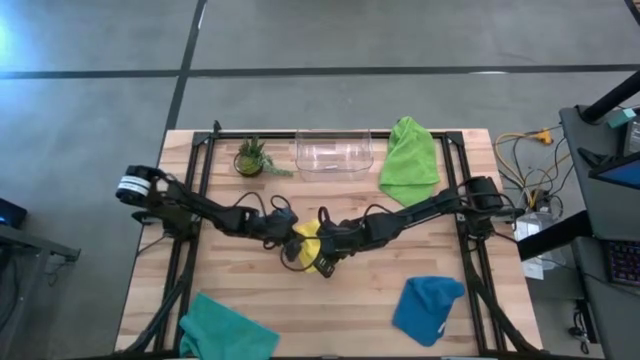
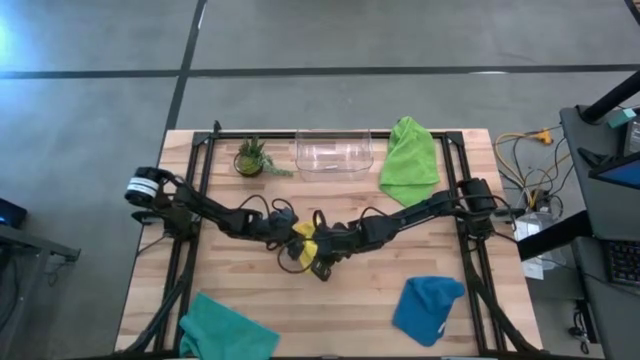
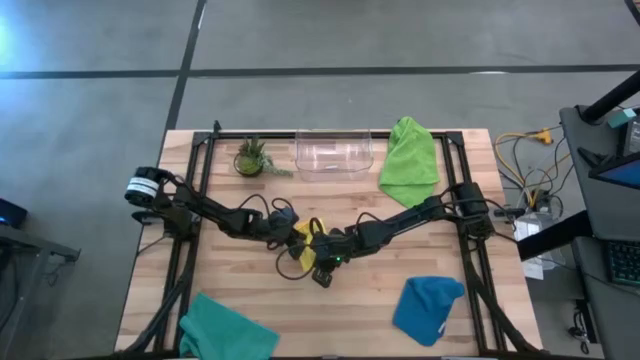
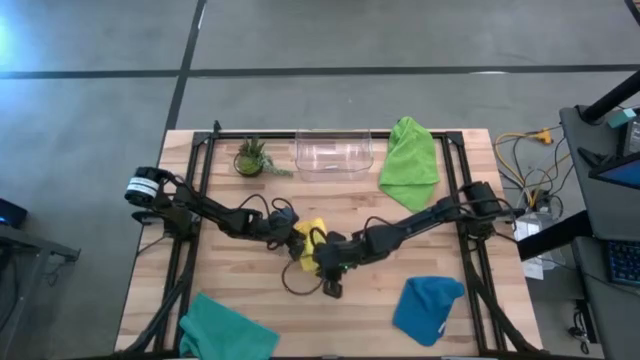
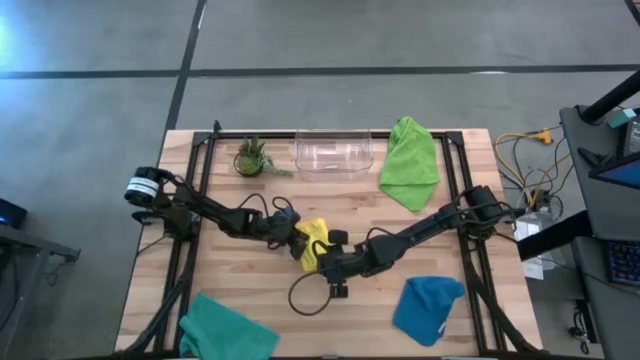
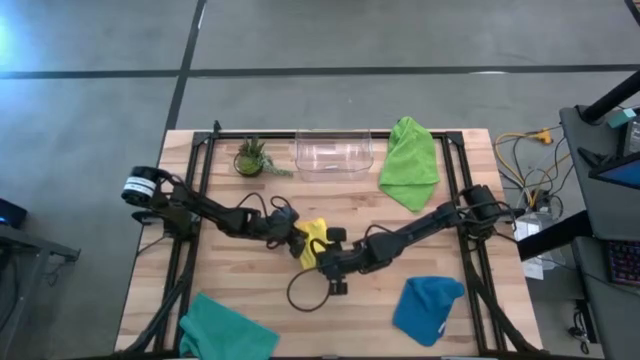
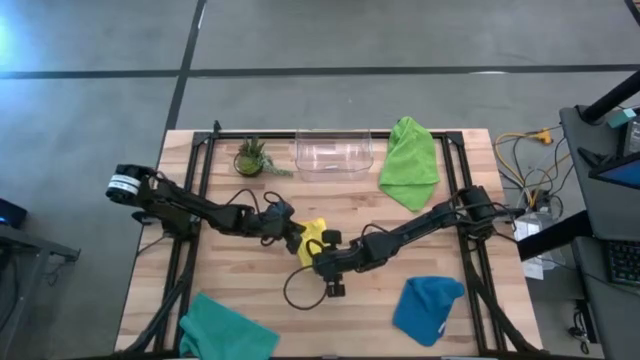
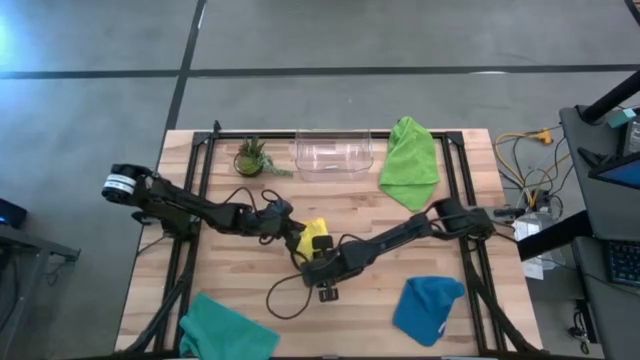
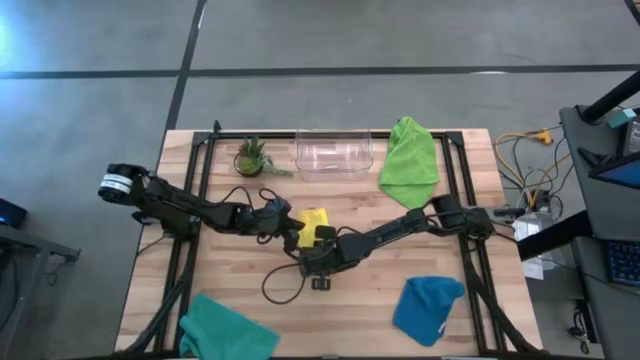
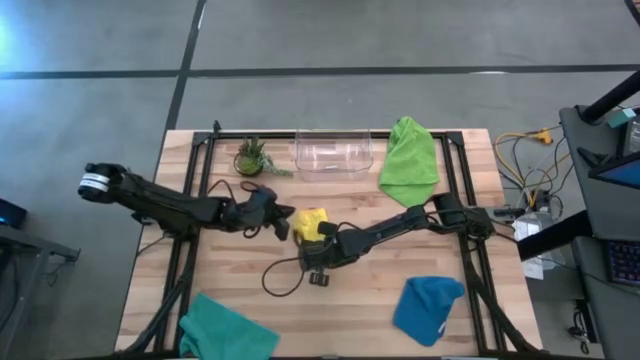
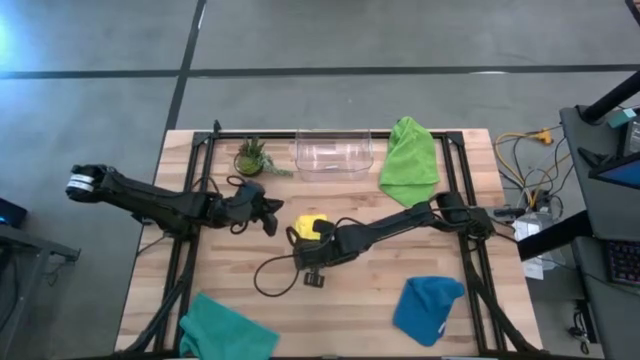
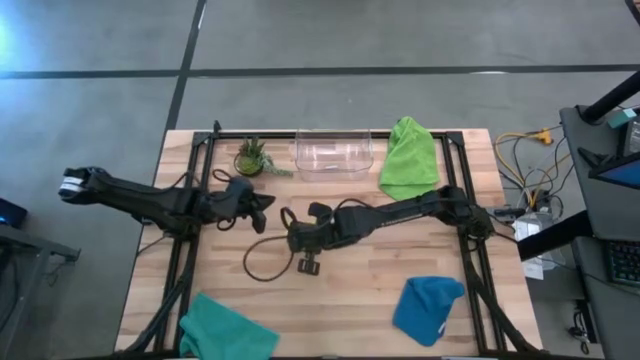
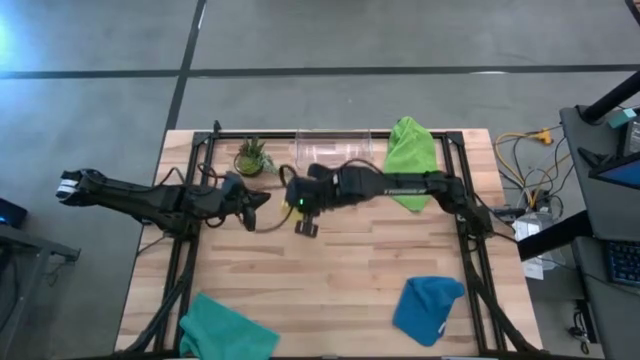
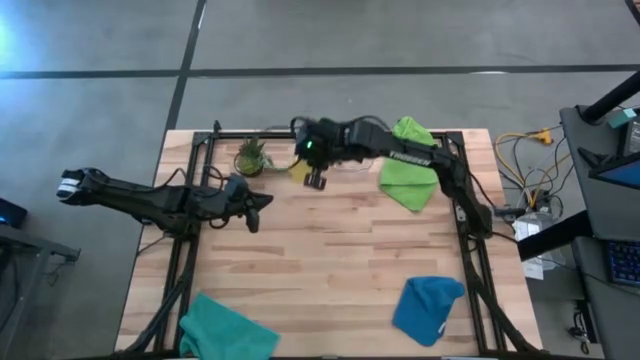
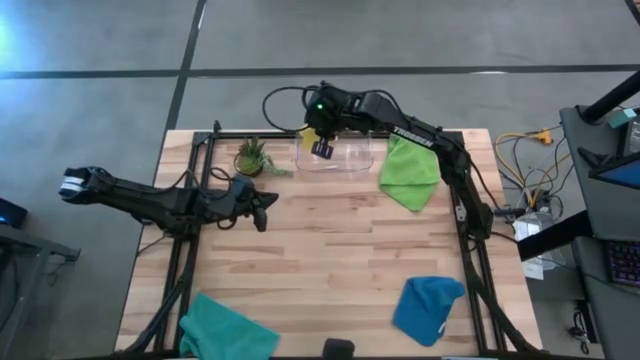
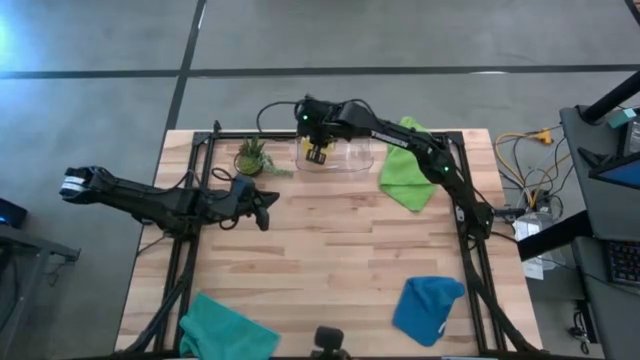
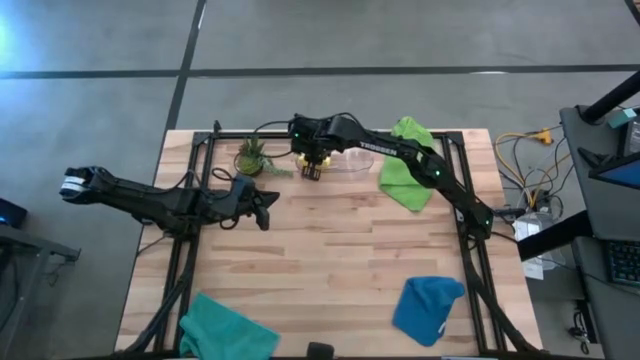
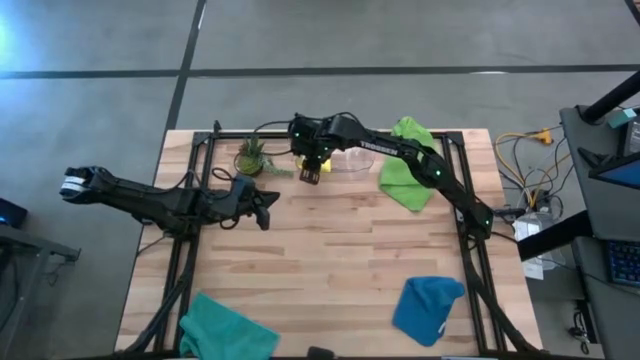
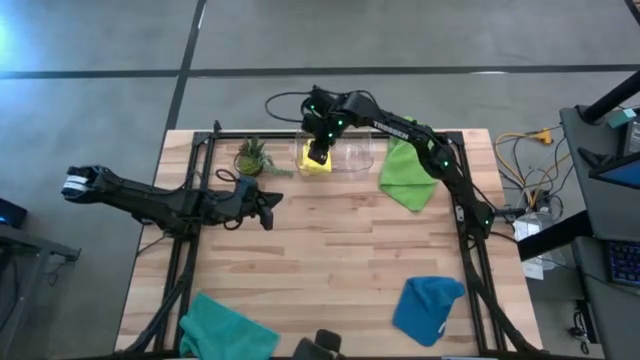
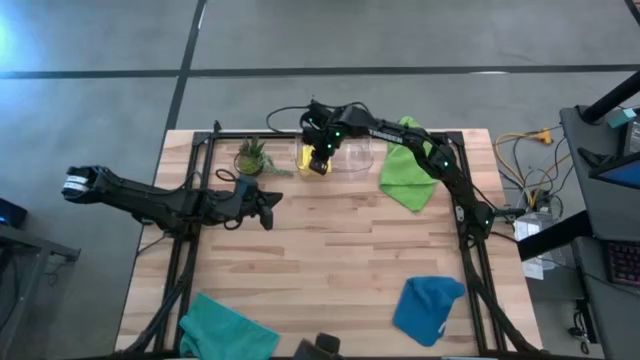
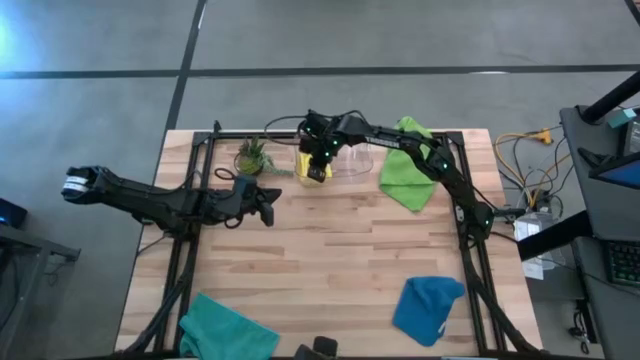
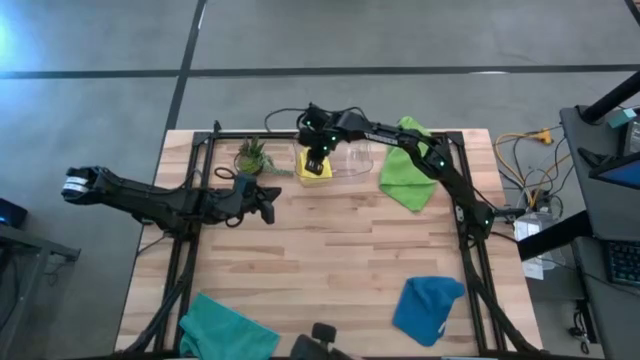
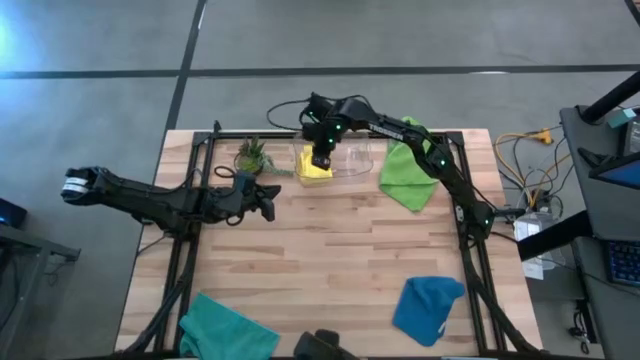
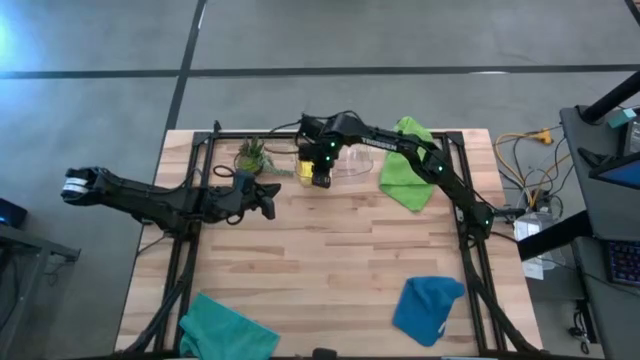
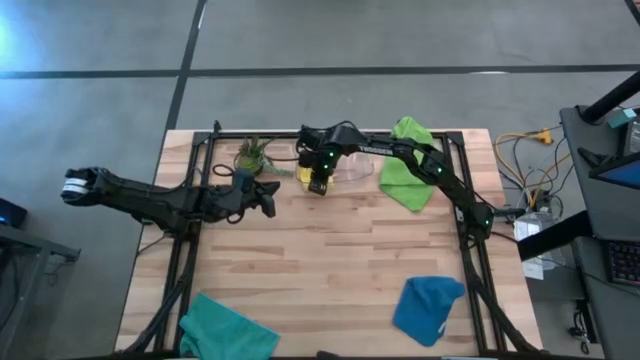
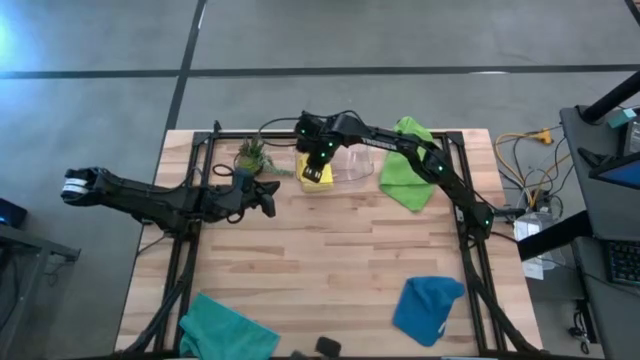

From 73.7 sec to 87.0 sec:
Task: Fold microfiber towels
Put the yellow microfiber towel into the transparent bin

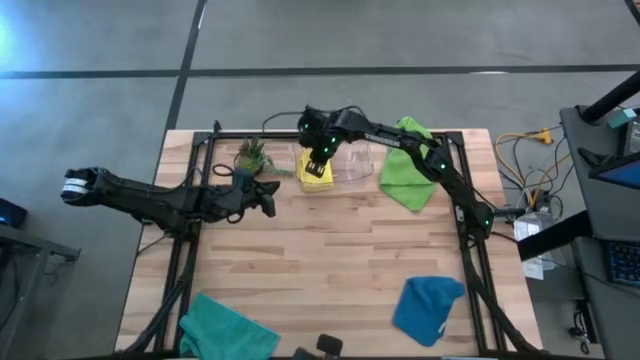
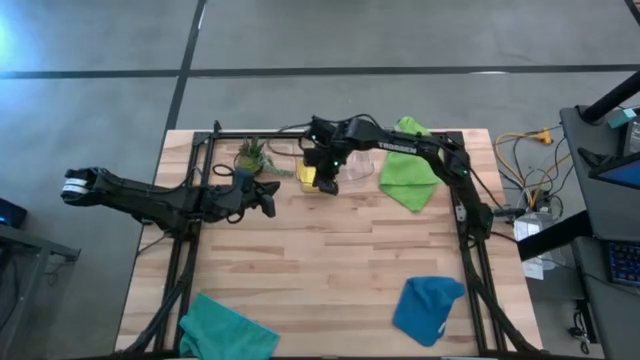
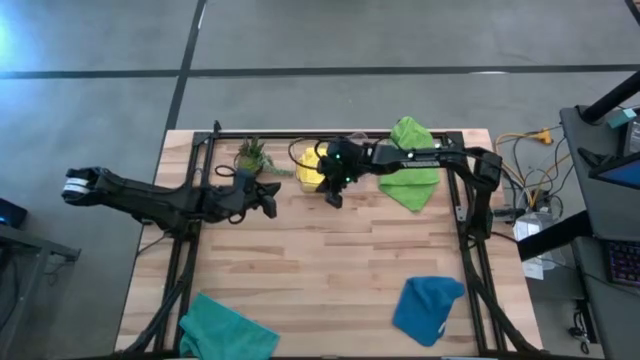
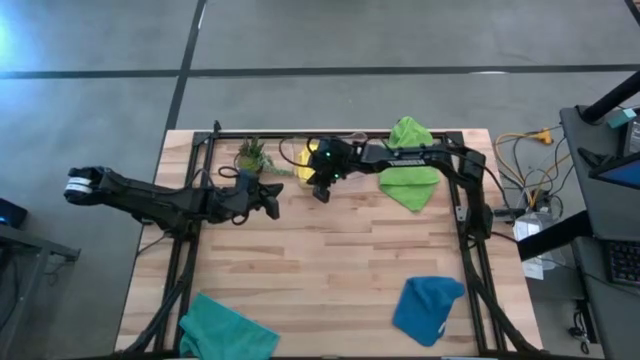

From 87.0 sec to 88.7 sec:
Adjust the transparent bin

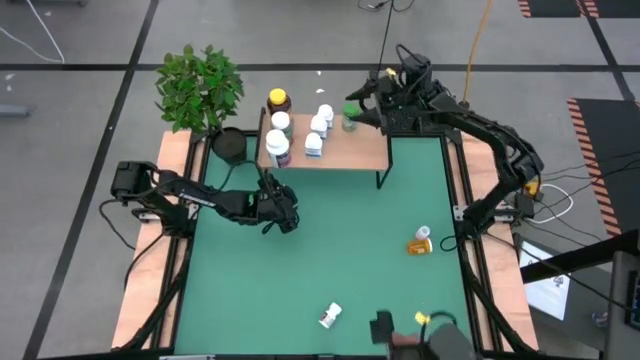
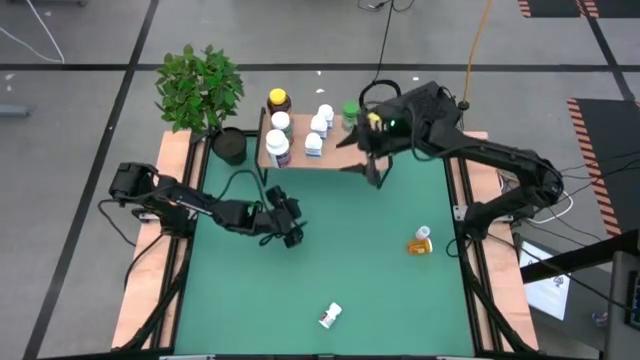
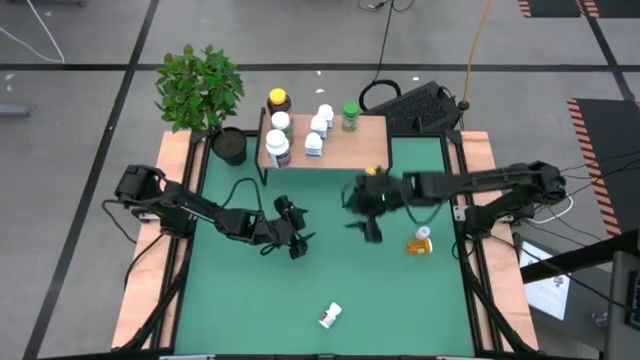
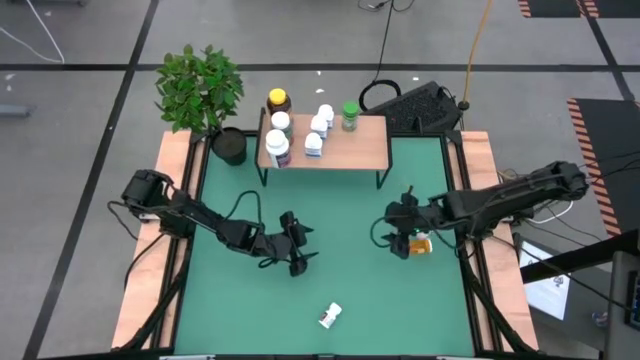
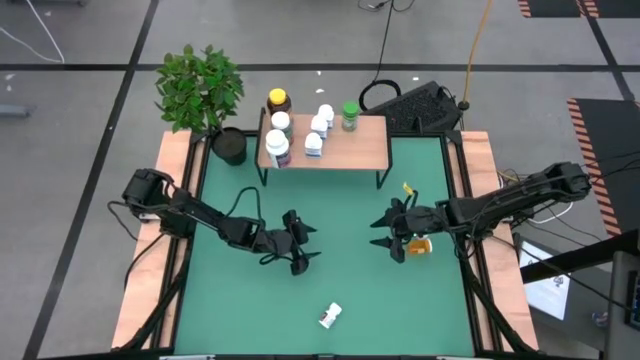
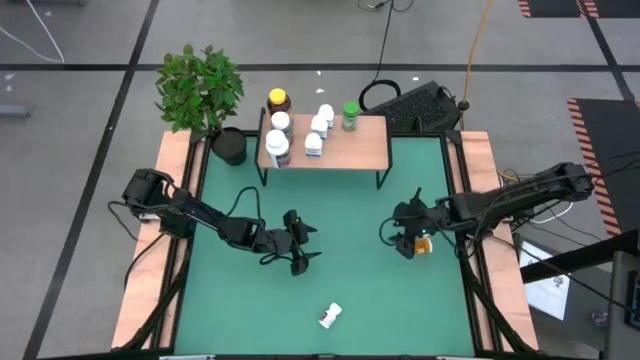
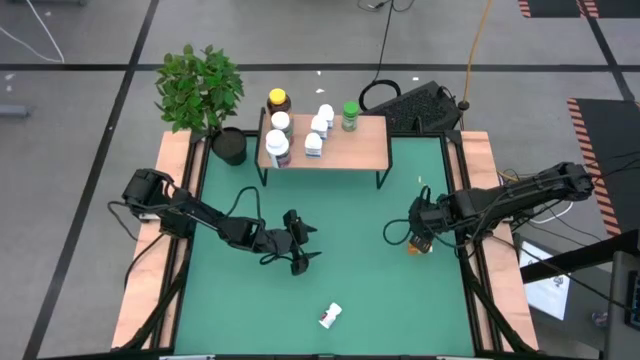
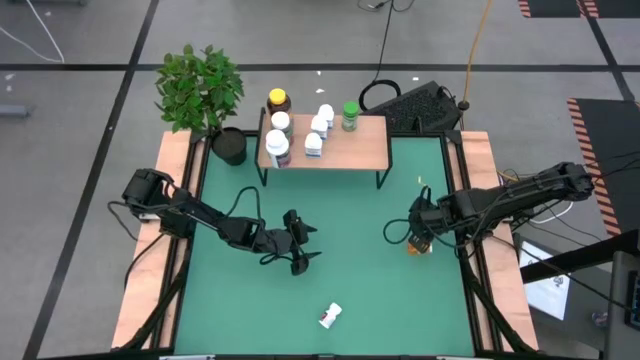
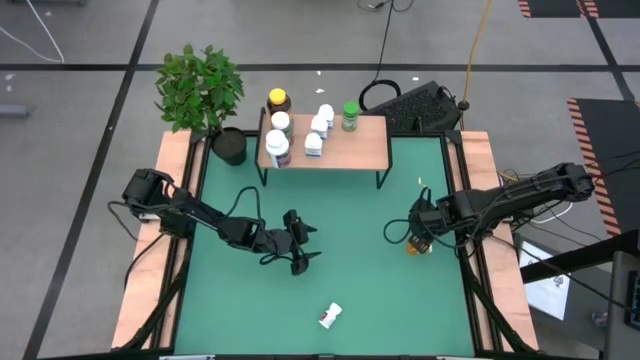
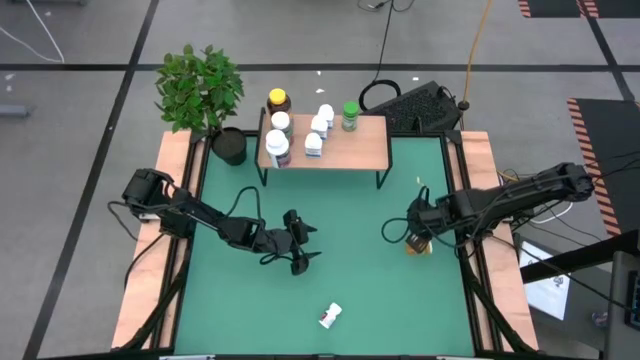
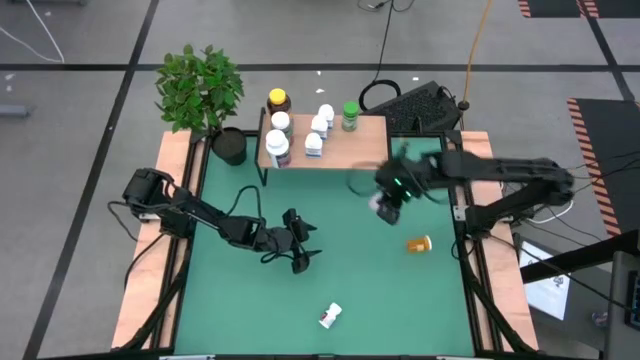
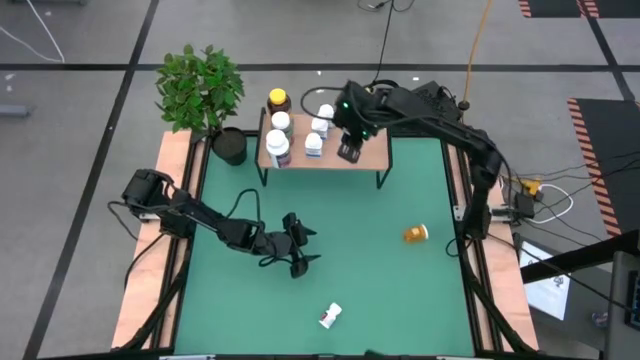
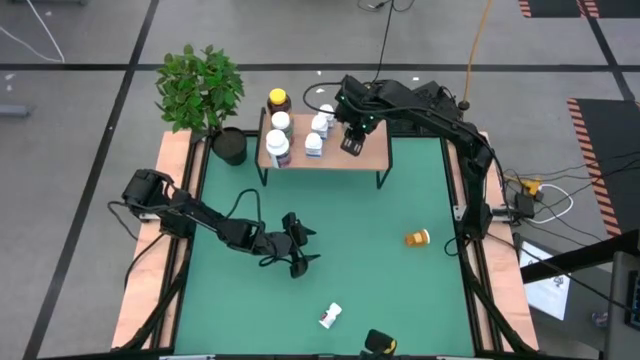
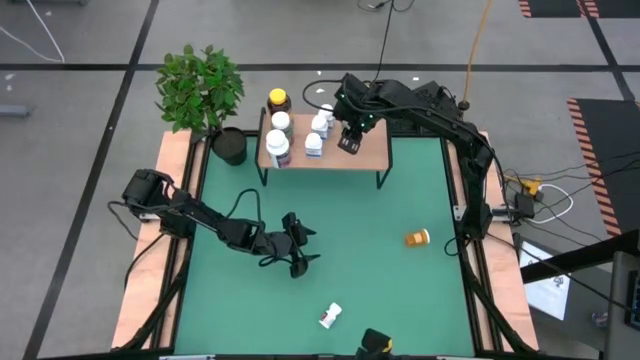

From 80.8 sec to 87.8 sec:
Task: Pick and place medicine bottles onto shelf by color
Put the white pill bottle on the shelf
